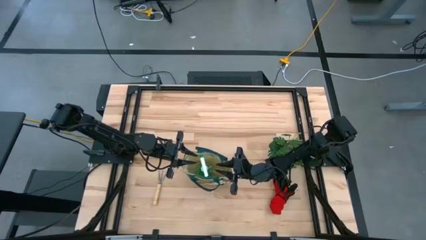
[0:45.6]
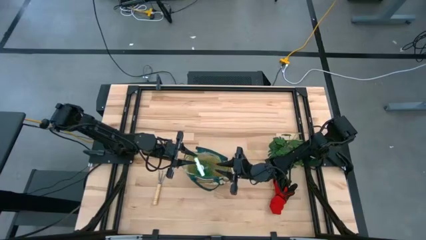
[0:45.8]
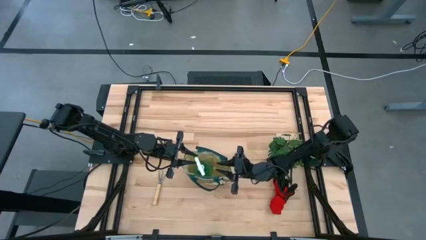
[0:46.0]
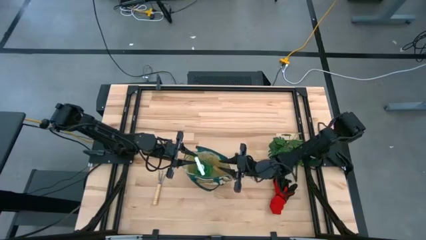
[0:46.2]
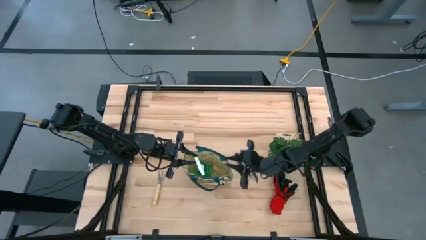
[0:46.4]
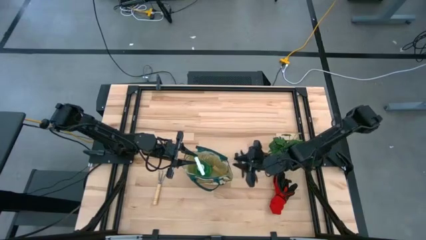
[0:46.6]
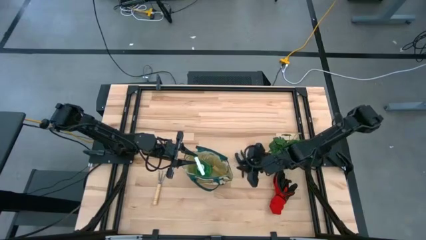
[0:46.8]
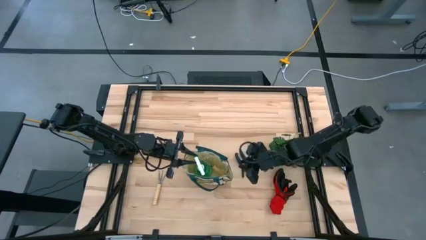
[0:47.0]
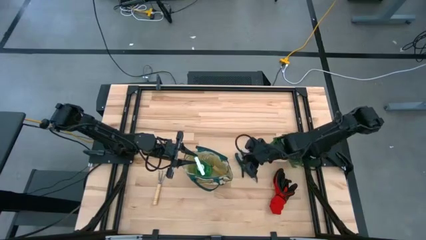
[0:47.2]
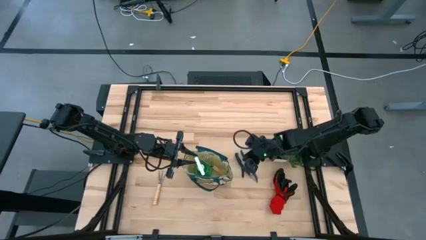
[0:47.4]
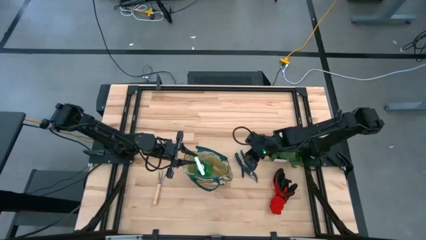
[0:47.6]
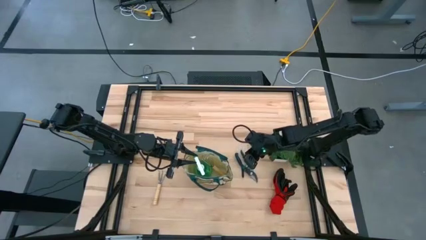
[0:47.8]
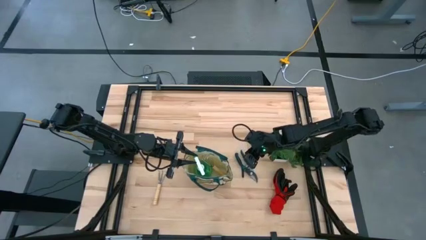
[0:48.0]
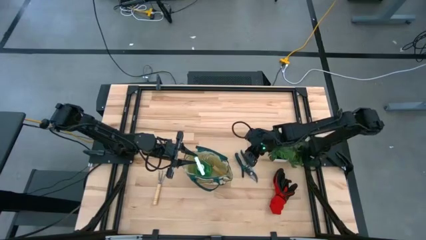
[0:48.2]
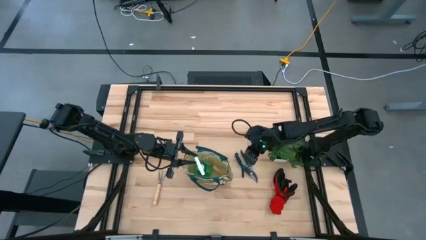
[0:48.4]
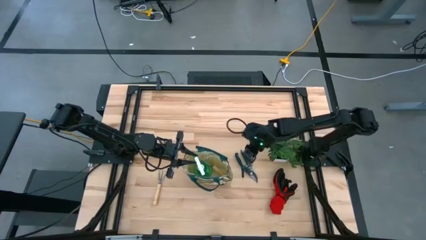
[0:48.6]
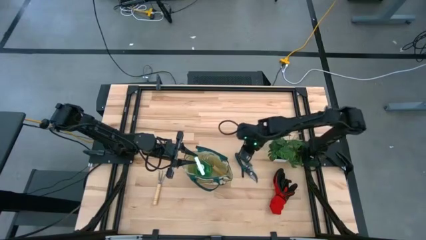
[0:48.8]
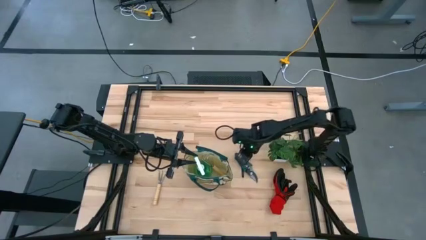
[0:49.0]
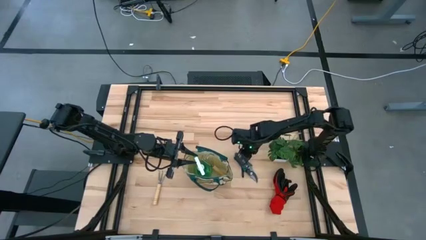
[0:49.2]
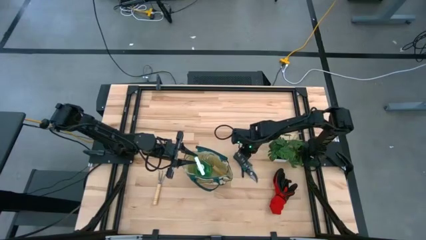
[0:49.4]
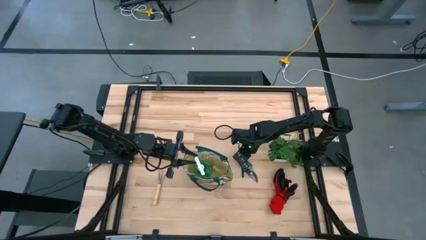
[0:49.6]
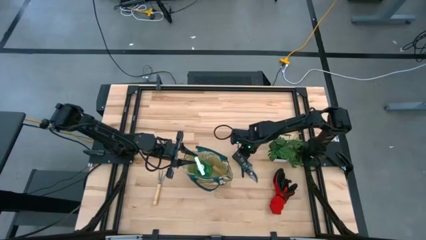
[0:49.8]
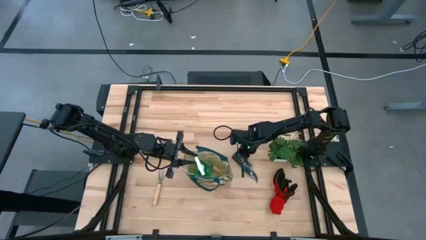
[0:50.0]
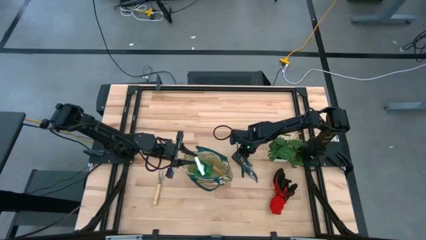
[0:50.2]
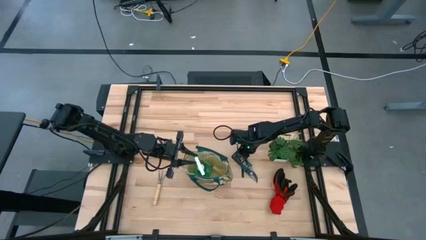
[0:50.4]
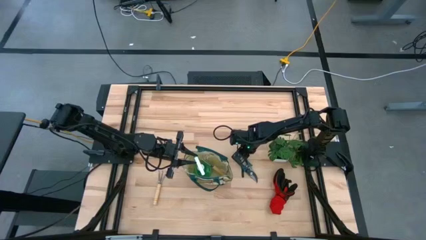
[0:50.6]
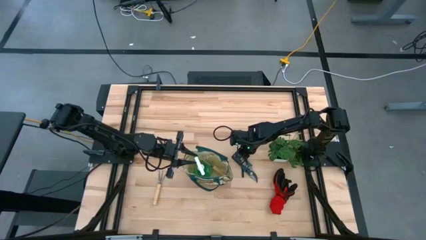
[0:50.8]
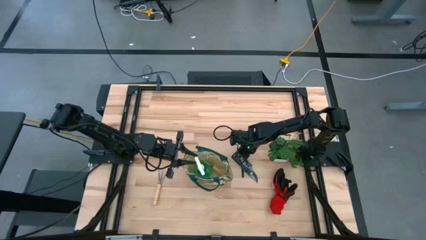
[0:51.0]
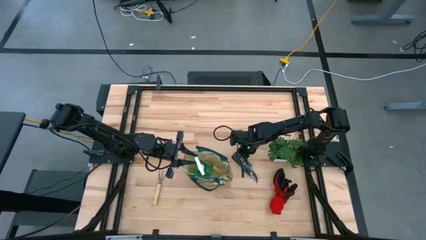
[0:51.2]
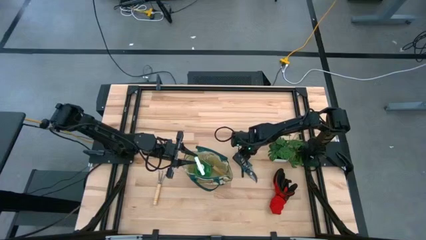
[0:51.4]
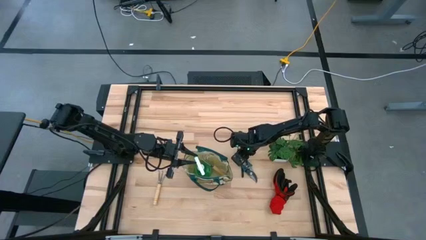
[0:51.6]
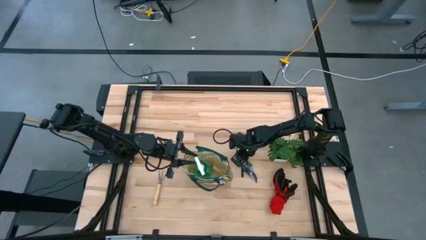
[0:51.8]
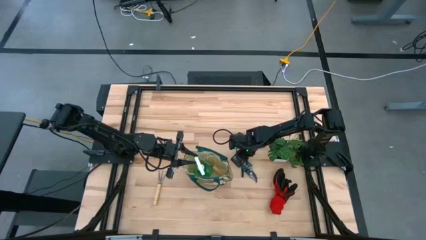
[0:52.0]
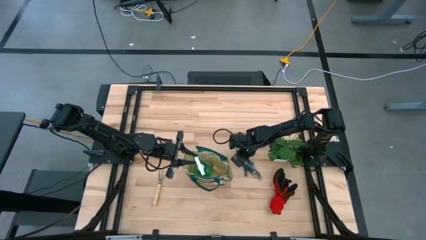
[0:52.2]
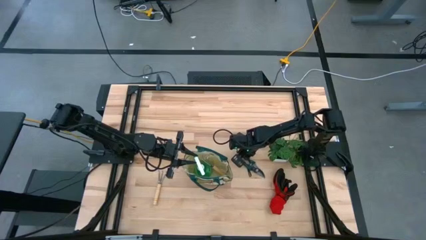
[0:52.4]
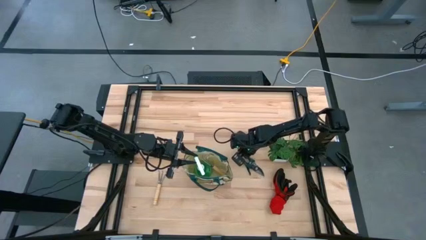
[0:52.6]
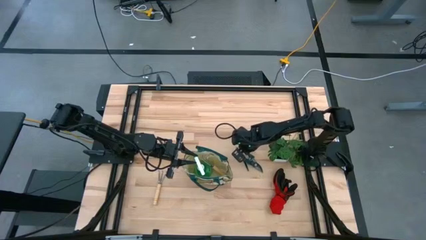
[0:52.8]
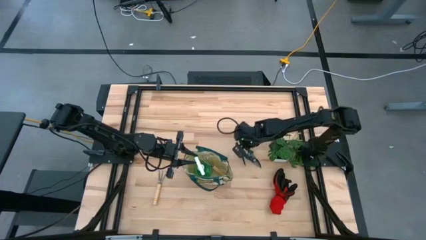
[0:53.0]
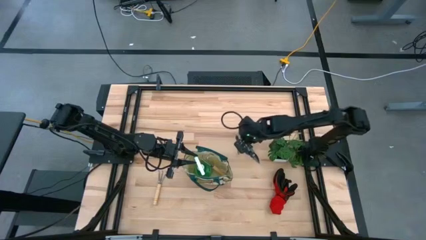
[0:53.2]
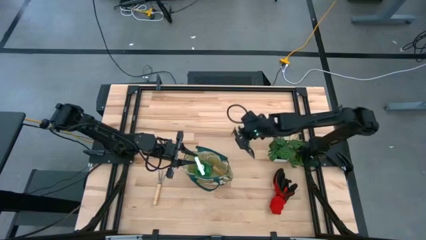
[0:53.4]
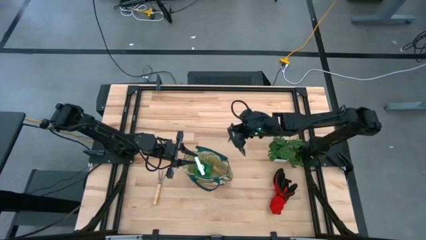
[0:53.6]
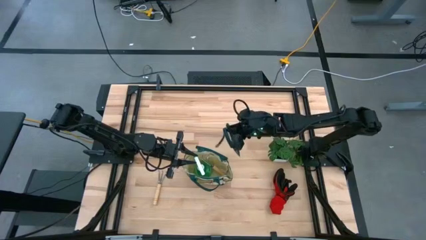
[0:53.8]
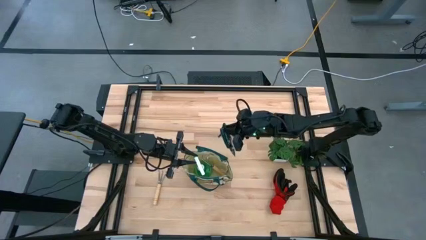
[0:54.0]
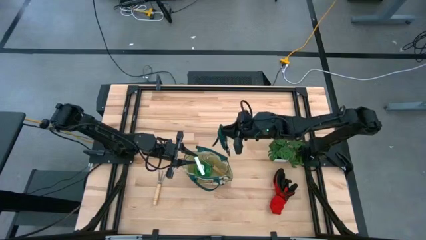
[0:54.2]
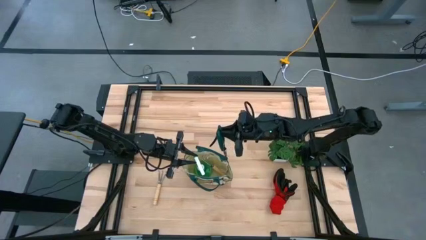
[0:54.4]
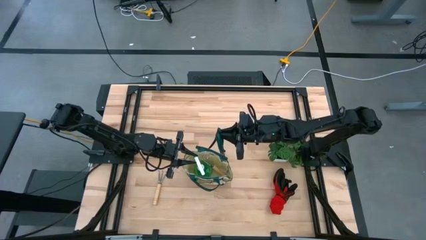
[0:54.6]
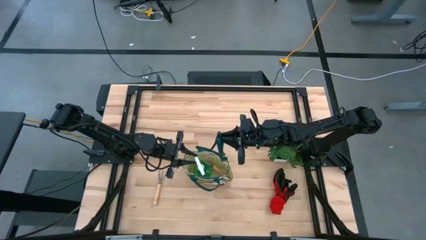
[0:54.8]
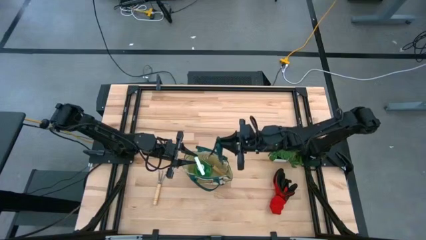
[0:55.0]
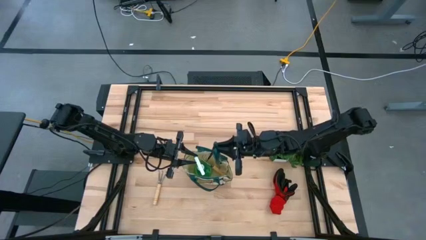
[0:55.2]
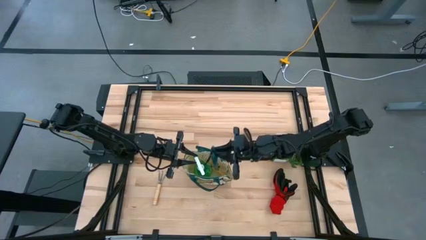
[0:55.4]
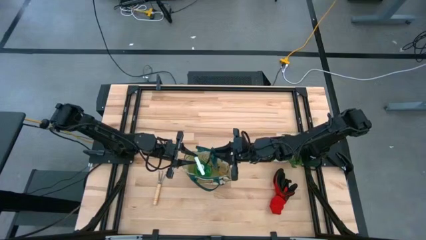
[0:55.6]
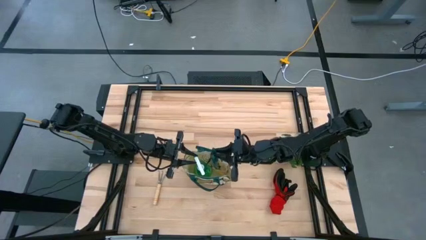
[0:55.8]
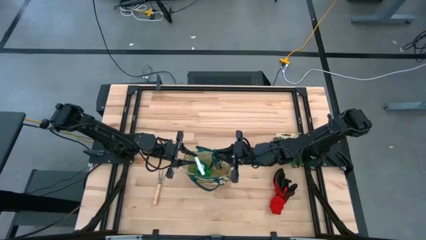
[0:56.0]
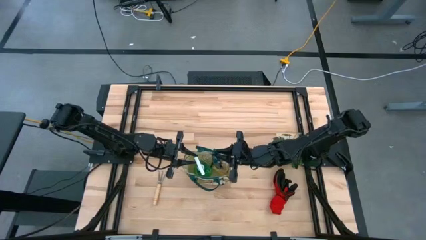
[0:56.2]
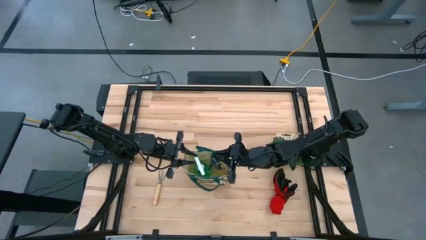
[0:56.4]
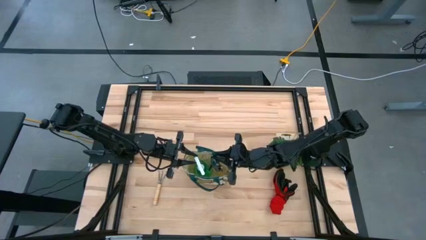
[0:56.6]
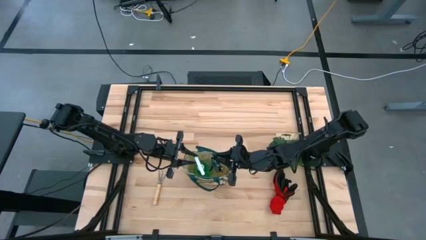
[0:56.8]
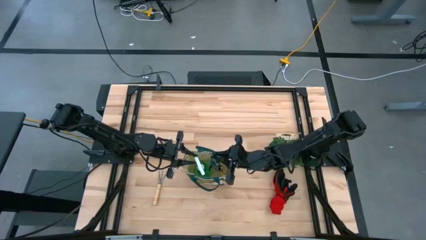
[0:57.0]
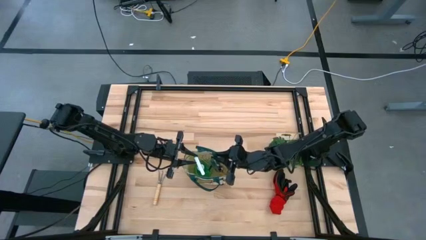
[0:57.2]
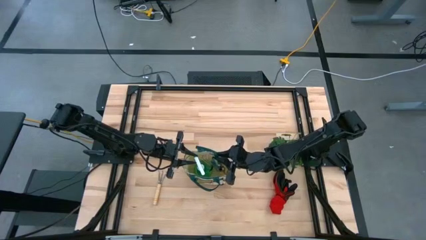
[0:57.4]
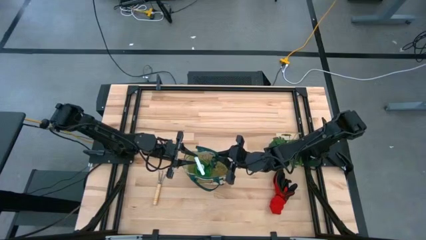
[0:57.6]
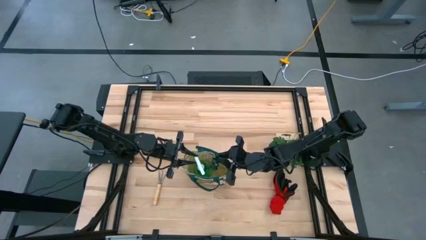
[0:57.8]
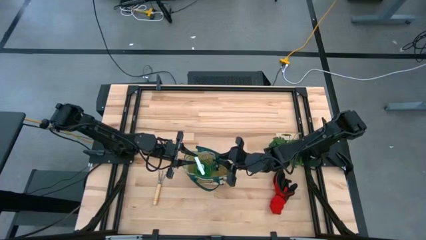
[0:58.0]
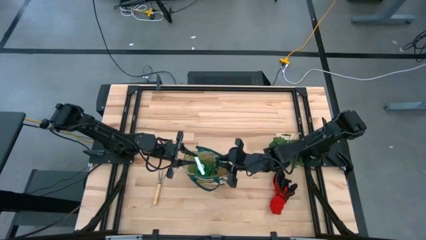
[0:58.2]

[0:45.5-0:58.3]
Task: Pick & Place Garden tools in Gardening bag
Put the green shear scissors into the gardening bag

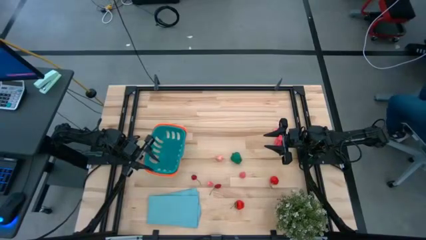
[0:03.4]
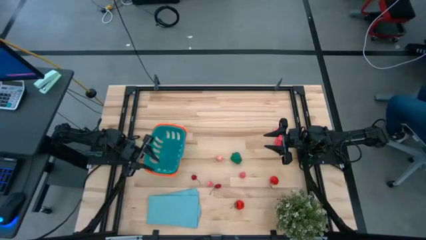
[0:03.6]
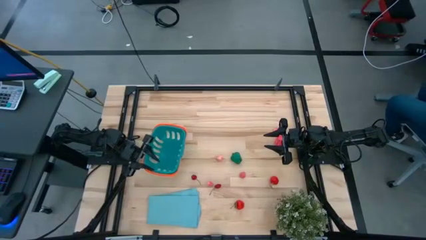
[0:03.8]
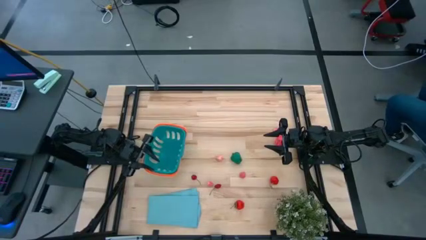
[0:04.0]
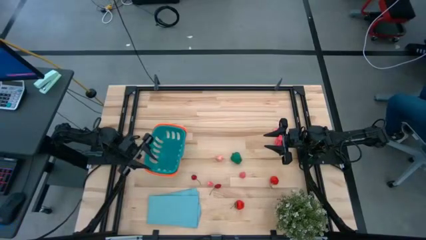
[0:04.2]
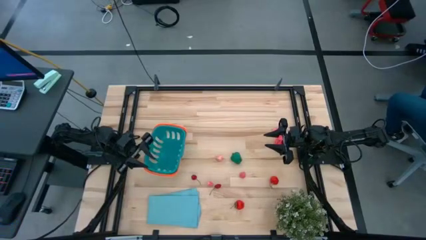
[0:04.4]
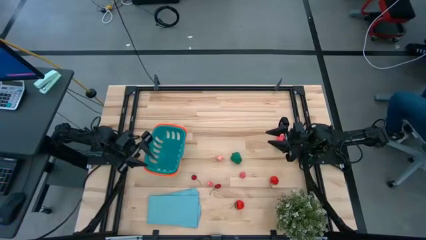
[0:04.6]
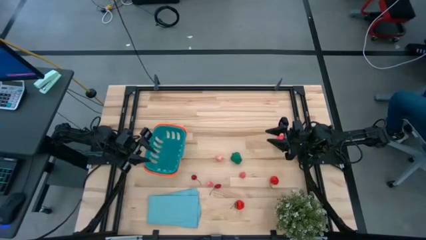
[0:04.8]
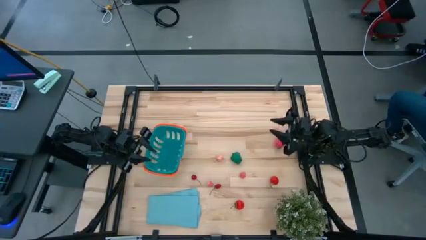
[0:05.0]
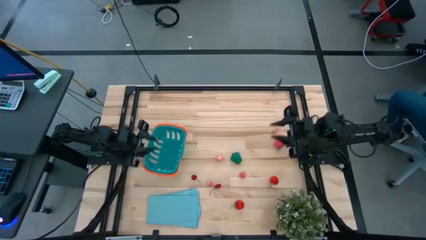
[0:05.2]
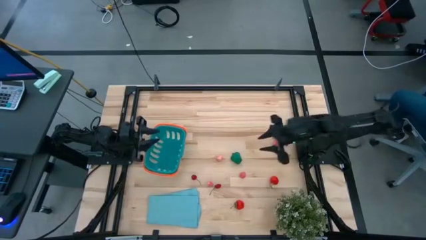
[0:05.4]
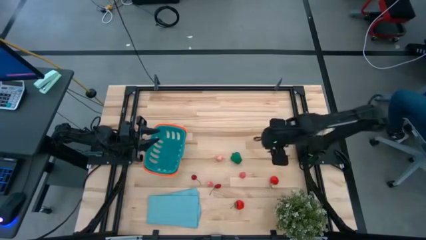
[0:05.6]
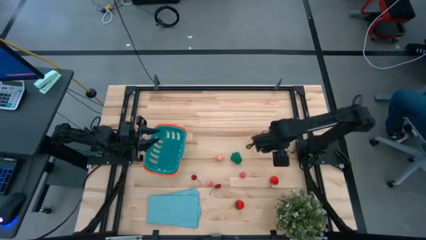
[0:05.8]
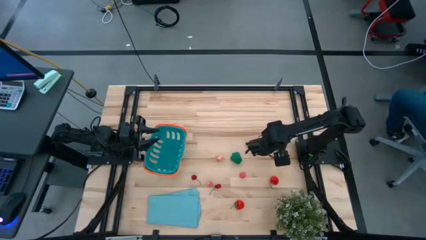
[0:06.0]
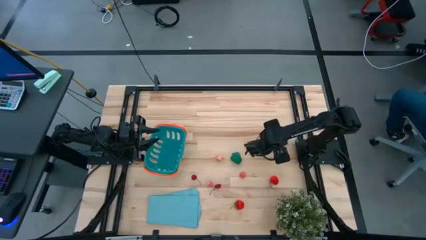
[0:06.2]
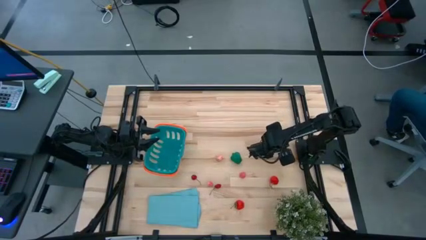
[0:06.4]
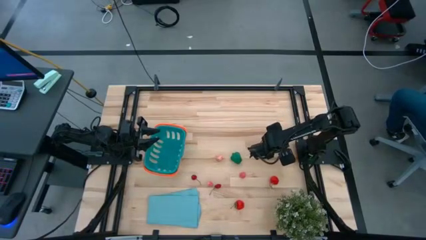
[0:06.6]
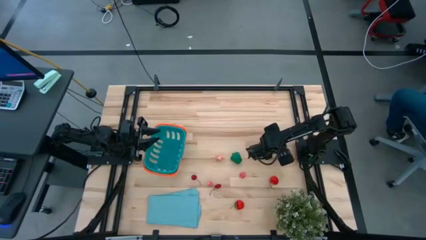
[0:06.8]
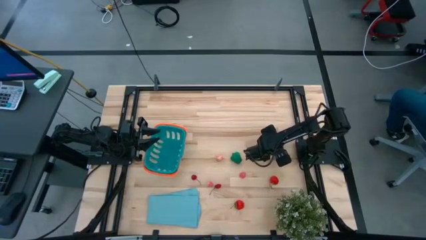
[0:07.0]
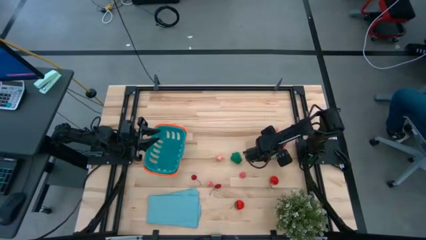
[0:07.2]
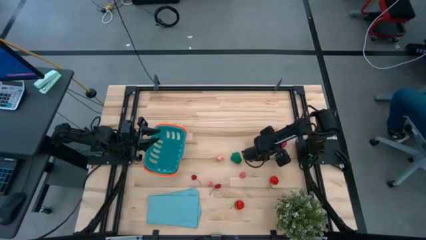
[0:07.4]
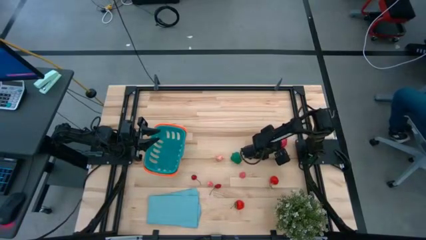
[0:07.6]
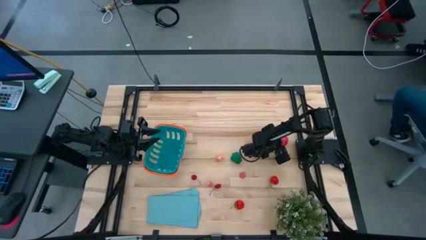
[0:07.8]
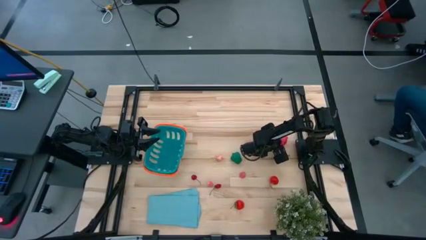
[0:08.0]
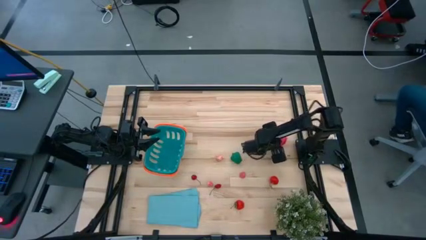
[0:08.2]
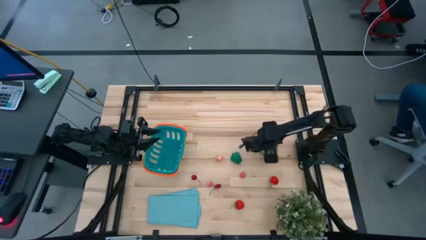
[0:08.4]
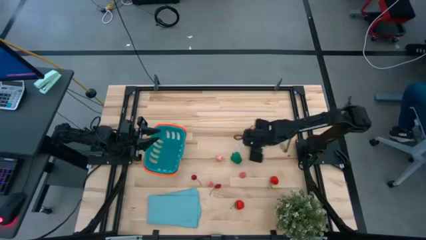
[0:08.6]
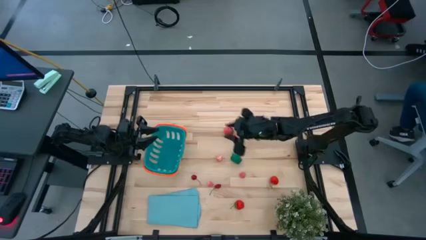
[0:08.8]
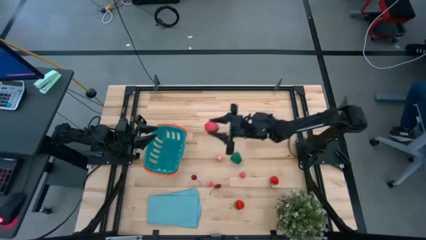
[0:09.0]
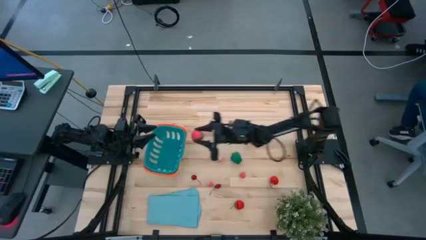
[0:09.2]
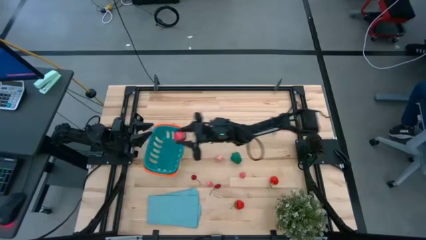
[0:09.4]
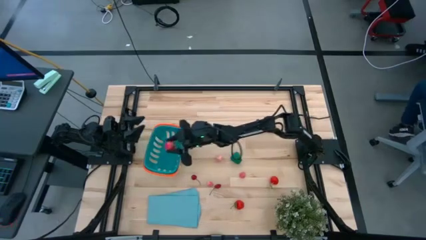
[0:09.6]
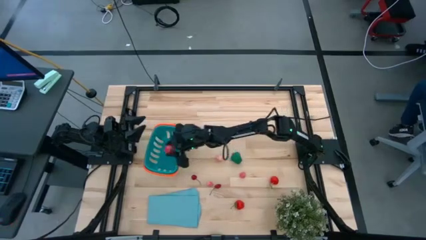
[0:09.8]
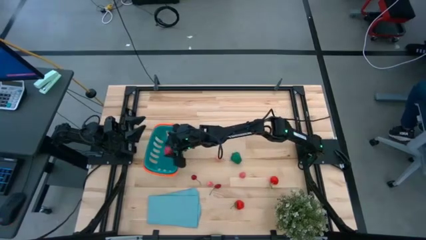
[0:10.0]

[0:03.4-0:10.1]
Task: Pick and placing Produce into tupperware
Put the pink dragon fruit into the blue basket
